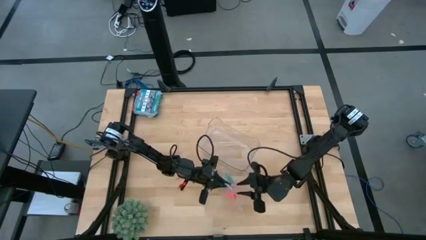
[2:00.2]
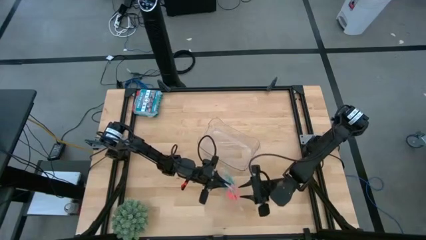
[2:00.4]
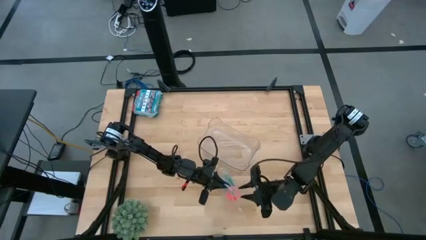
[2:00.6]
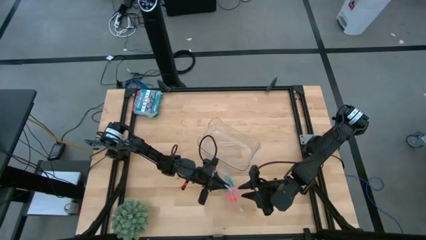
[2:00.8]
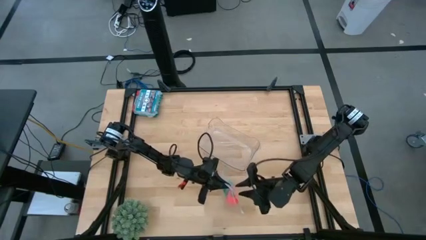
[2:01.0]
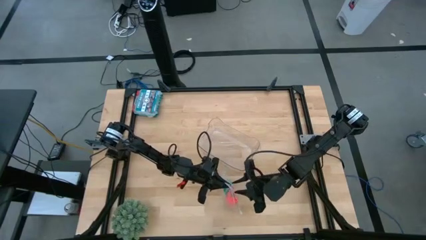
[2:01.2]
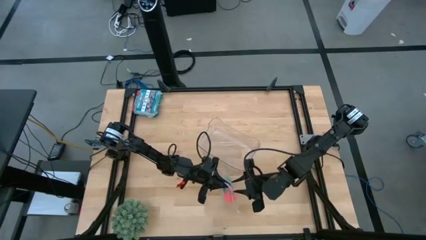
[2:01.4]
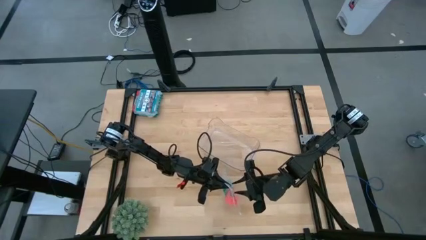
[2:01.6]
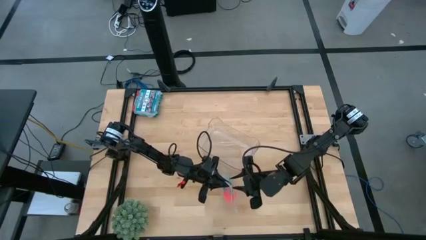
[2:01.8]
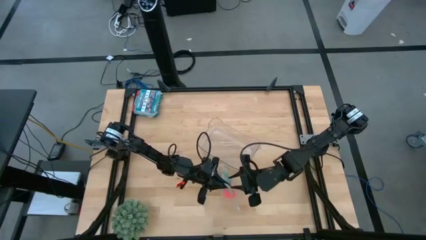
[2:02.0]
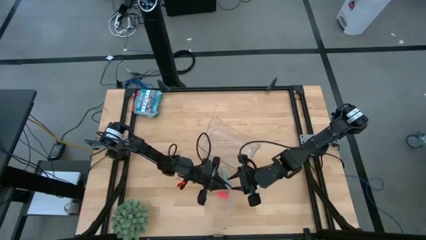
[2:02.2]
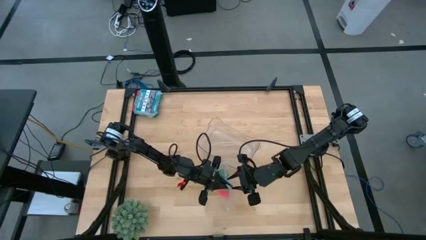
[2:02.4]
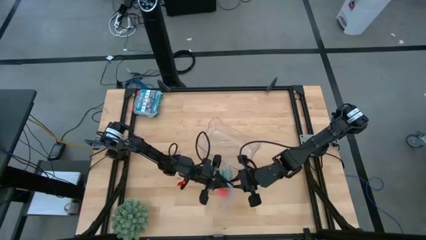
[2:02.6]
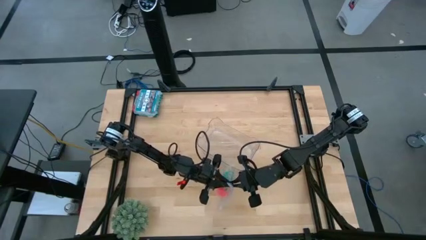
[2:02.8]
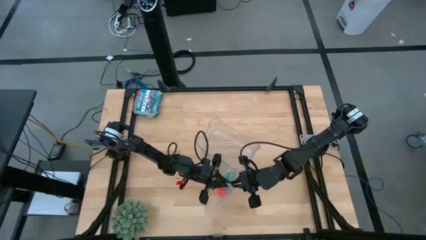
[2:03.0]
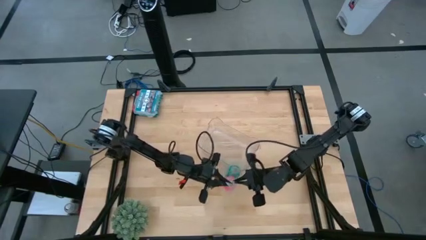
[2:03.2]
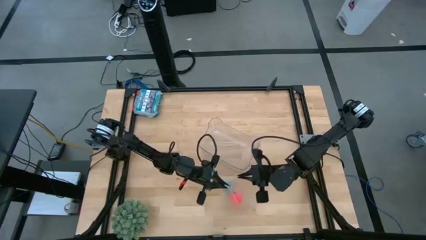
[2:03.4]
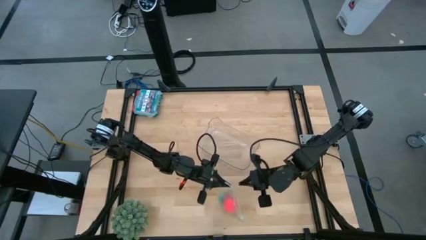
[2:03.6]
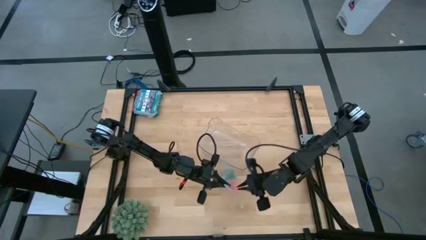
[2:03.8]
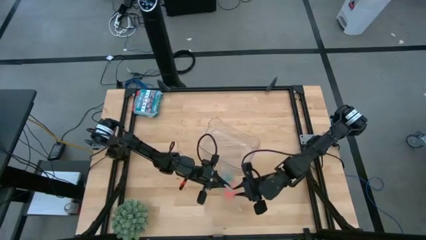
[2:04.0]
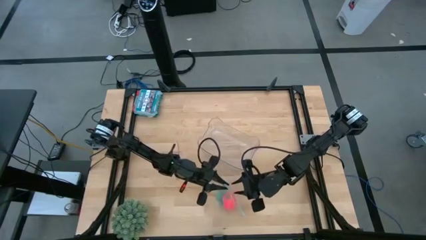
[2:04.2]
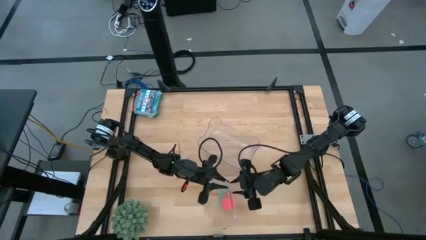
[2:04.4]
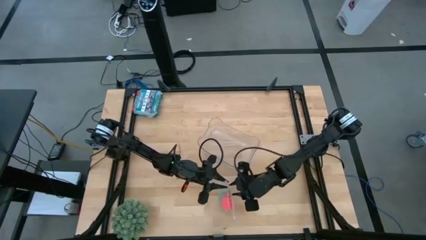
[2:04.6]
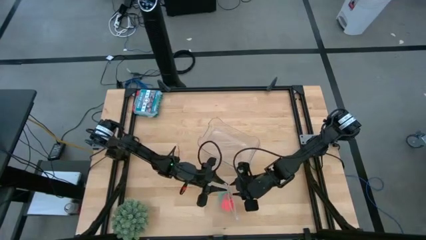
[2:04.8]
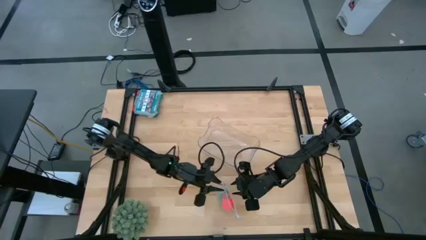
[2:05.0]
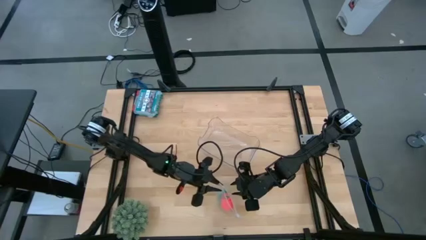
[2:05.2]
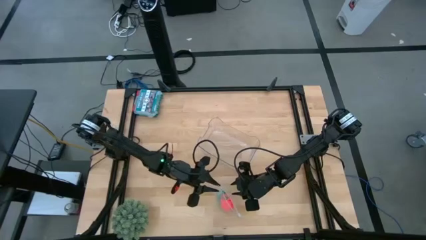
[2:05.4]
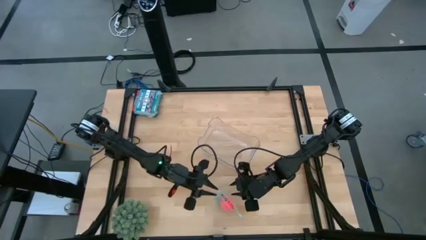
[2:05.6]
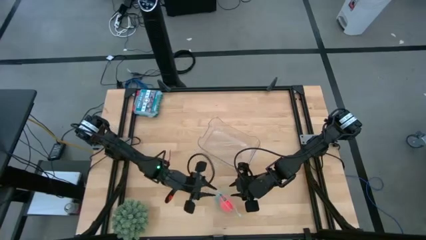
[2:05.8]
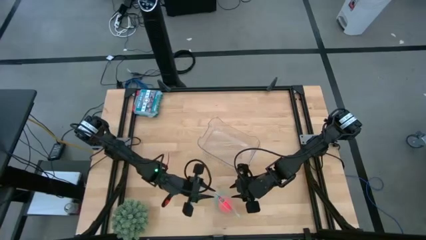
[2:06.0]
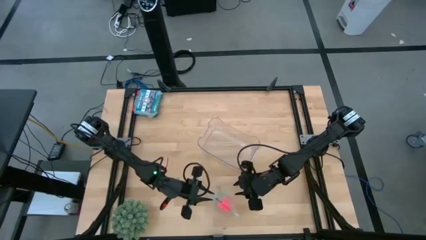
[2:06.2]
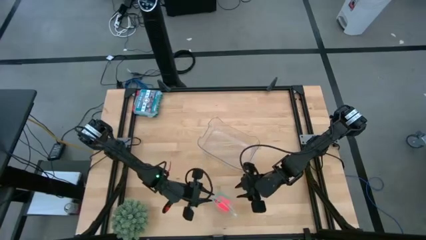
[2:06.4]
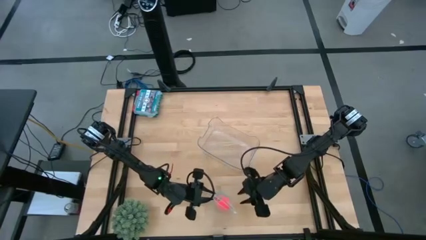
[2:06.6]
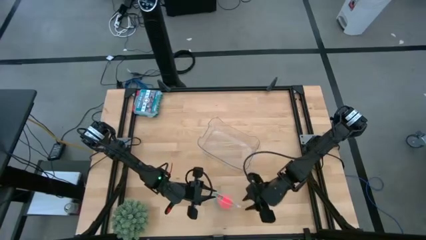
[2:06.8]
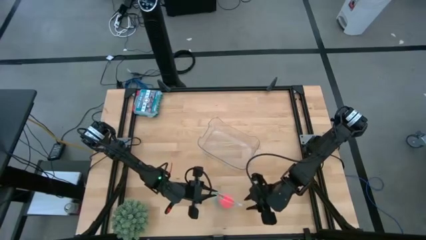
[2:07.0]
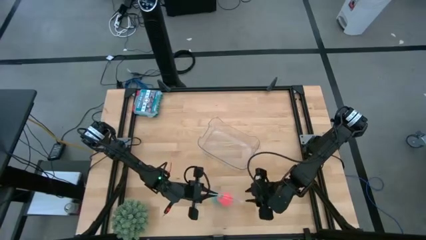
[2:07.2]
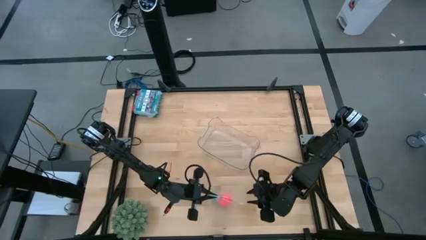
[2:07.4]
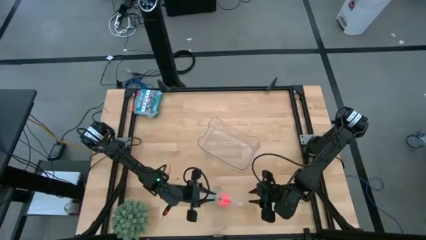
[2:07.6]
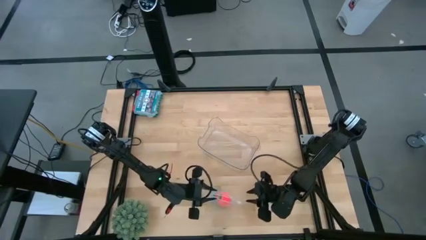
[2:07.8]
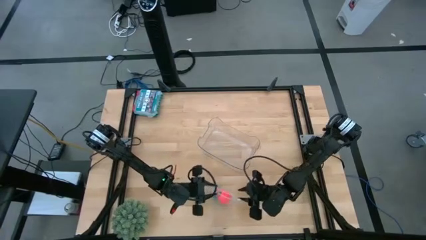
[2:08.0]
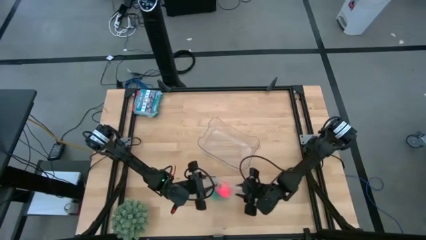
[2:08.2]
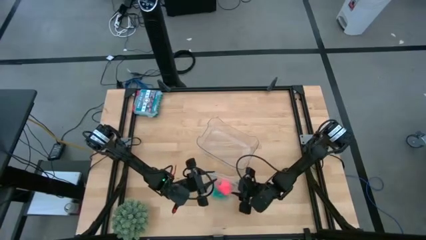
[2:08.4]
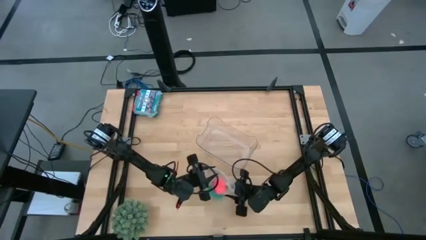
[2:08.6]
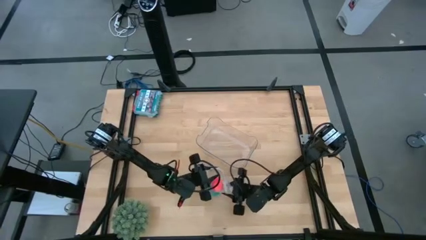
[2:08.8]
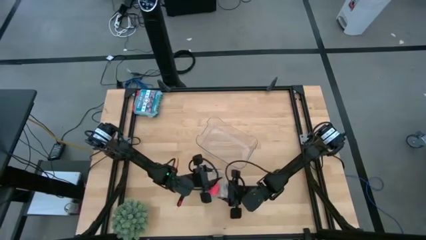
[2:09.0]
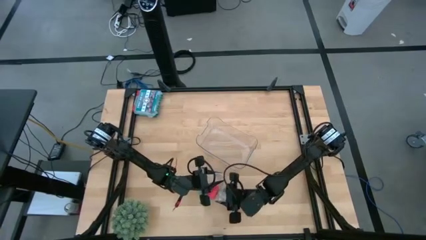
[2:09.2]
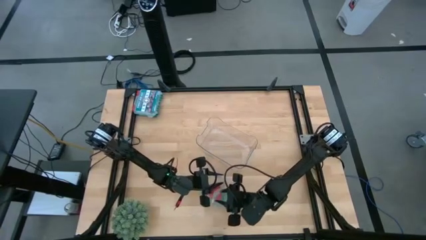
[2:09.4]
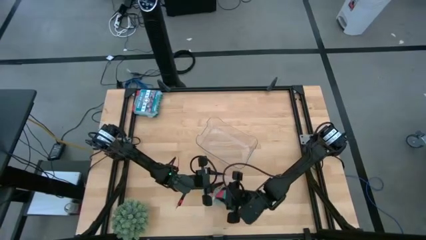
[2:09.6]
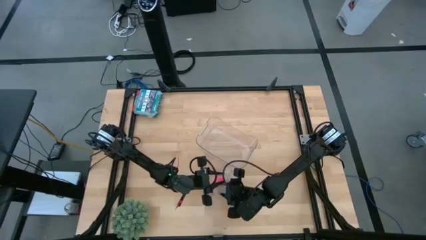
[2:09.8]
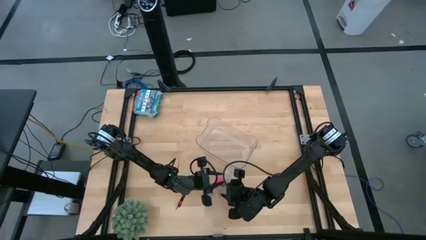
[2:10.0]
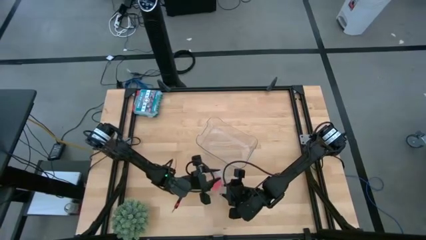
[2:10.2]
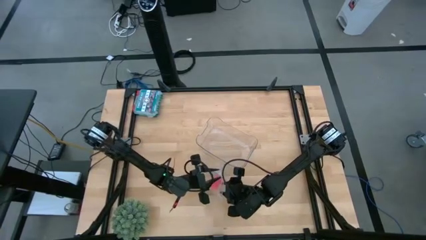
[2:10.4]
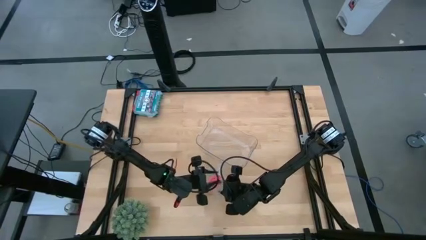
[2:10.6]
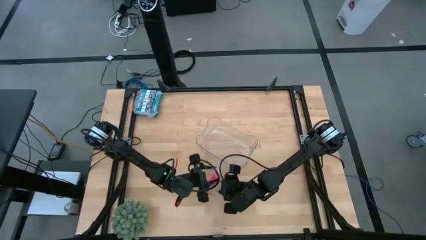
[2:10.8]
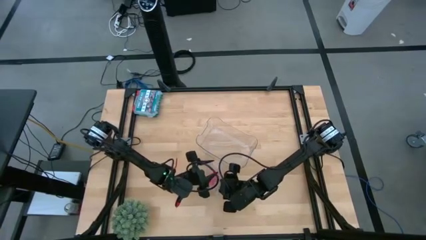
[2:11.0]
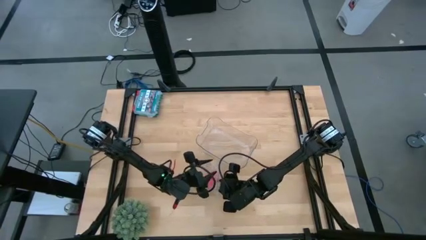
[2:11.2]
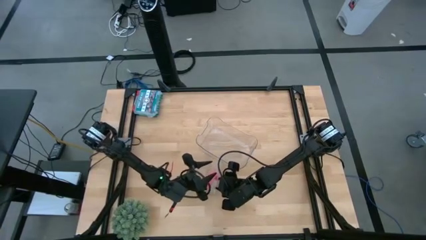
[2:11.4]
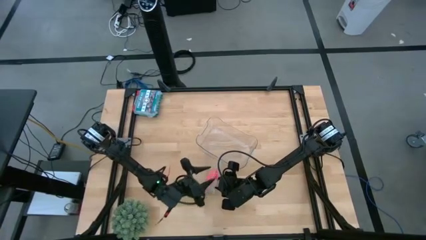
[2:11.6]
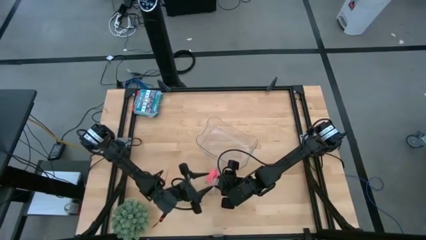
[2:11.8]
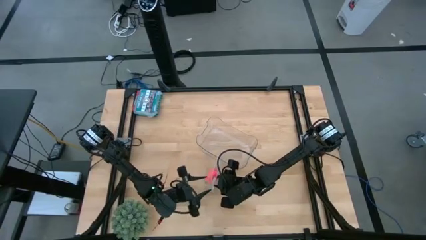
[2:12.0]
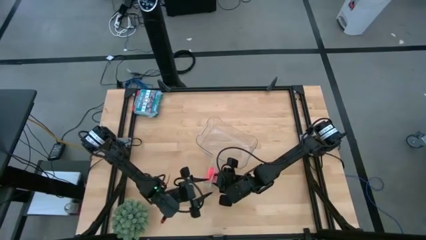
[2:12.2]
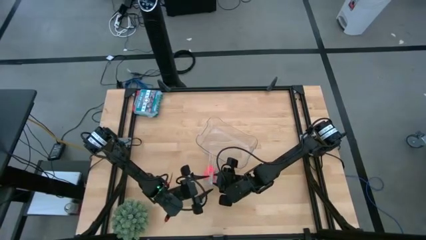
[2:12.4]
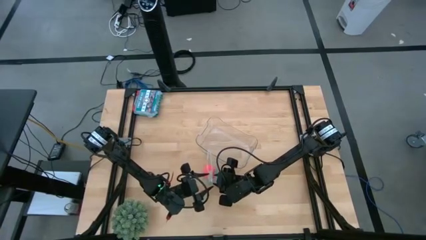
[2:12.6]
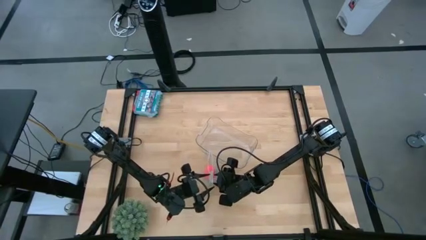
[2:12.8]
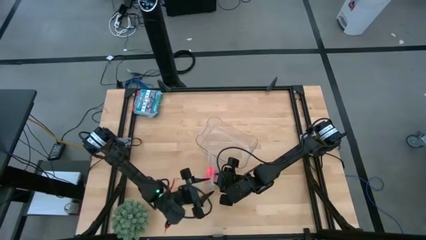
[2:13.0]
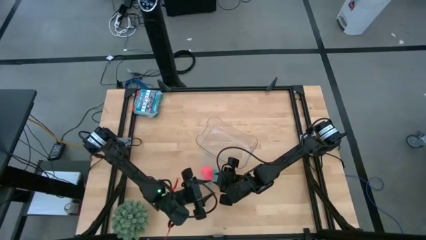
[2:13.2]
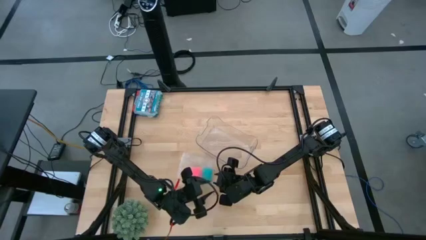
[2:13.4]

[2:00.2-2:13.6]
Task: Roll bandage
Close the transparent zip bag

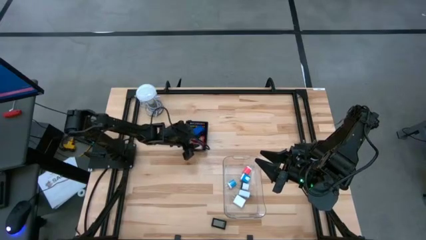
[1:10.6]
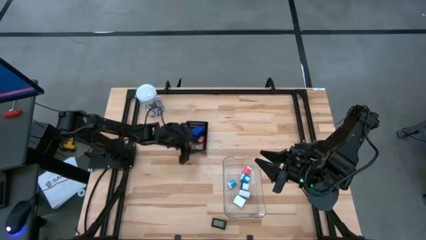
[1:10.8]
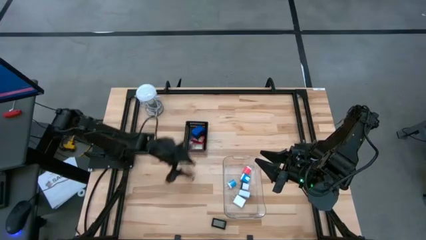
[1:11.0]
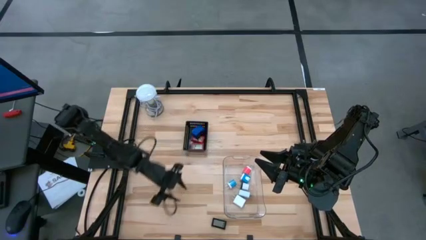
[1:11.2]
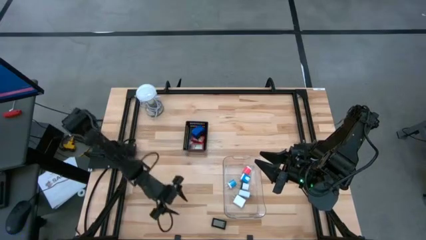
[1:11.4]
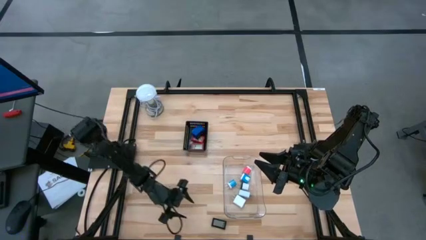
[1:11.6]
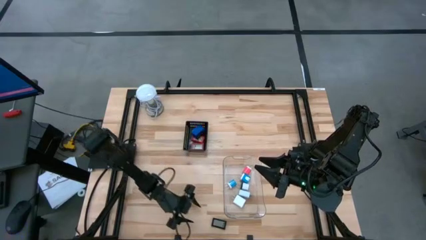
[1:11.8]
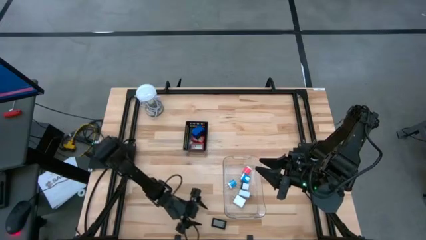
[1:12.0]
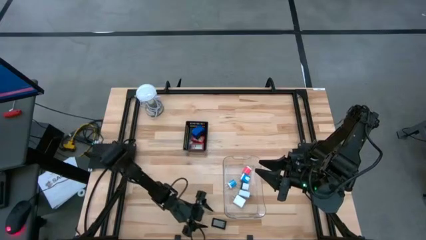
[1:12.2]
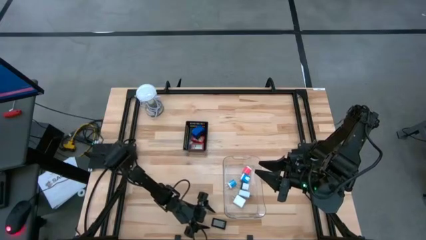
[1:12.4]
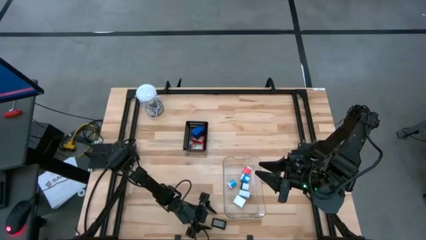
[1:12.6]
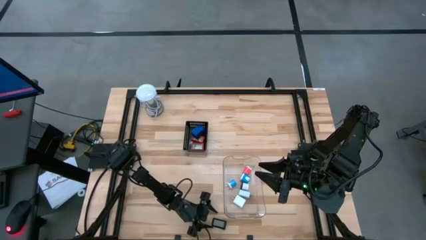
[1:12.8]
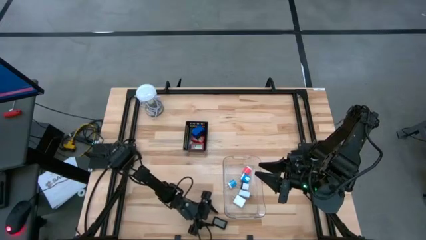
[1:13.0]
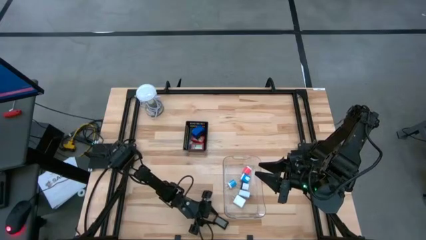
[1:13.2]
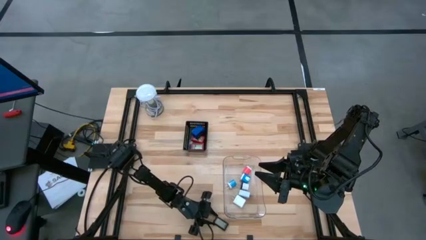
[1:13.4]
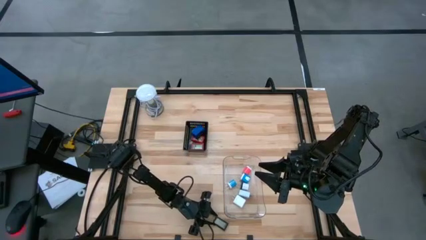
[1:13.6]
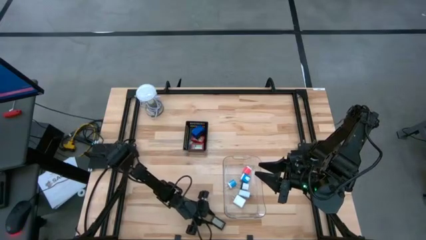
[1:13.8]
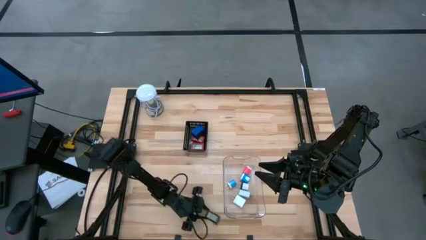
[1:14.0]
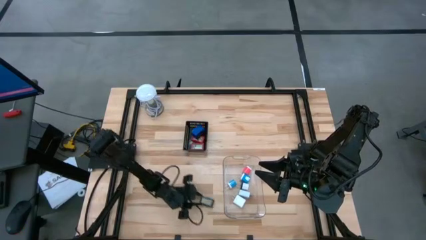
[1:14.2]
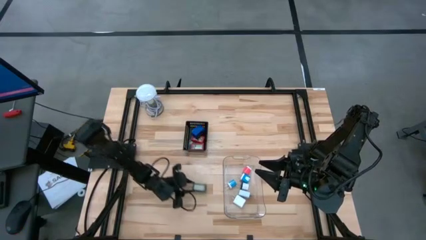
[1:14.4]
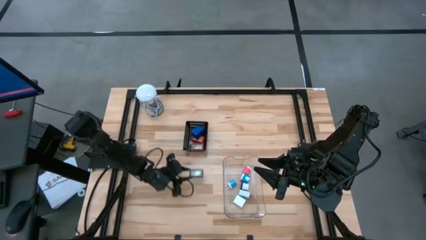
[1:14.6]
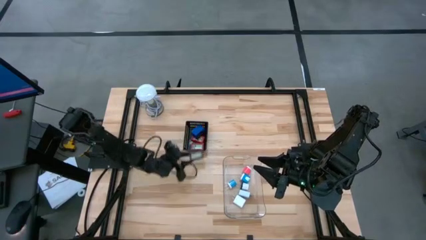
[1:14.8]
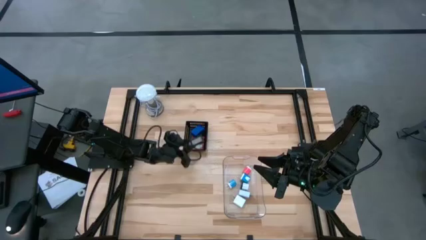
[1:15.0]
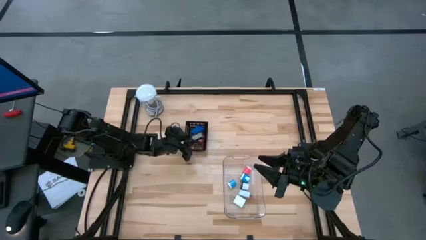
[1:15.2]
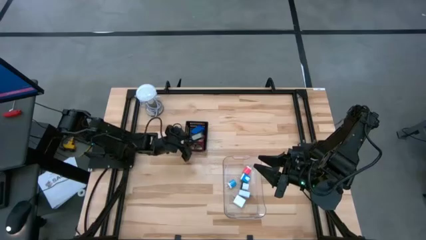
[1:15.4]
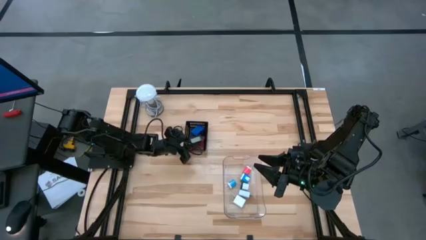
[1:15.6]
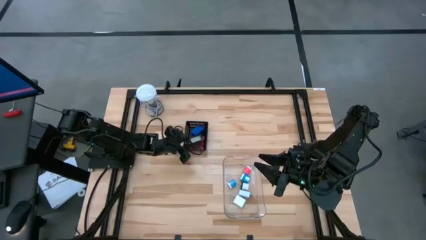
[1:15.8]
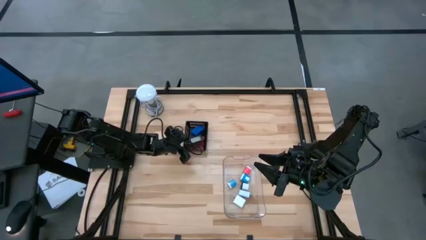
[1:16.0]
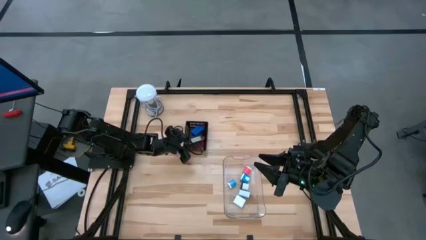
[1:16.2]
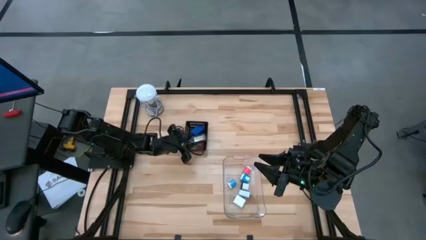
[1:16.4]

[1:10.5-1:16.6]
Task: Pick & Place Office items
Put the black digital clock into the black bin
